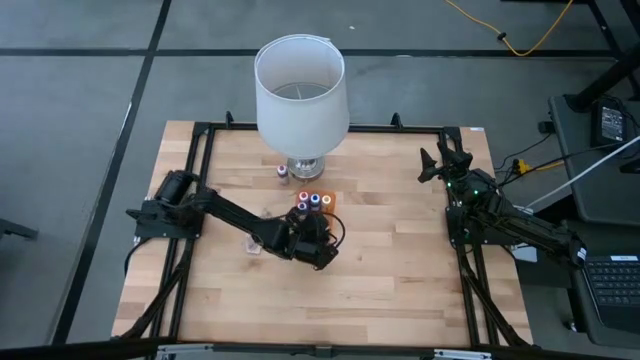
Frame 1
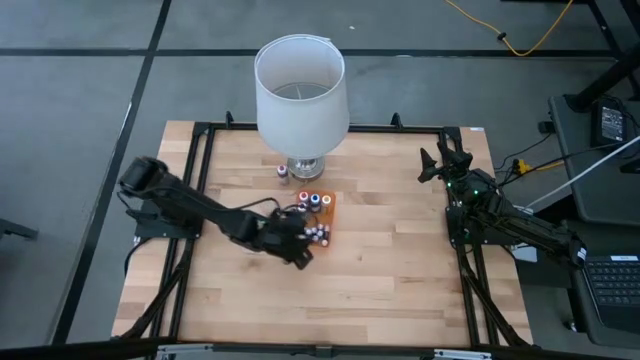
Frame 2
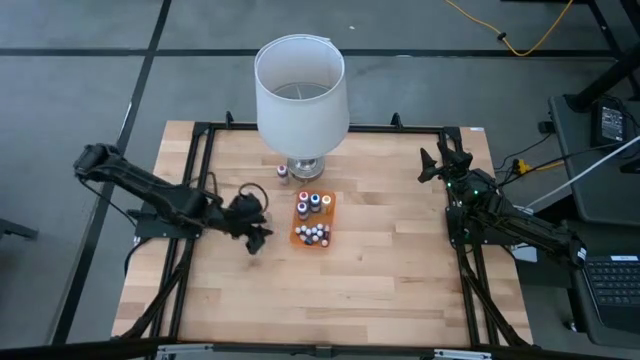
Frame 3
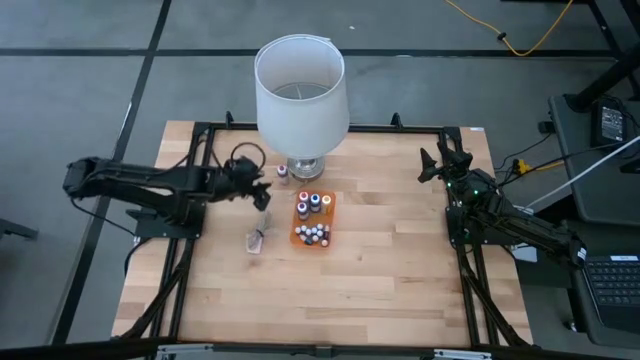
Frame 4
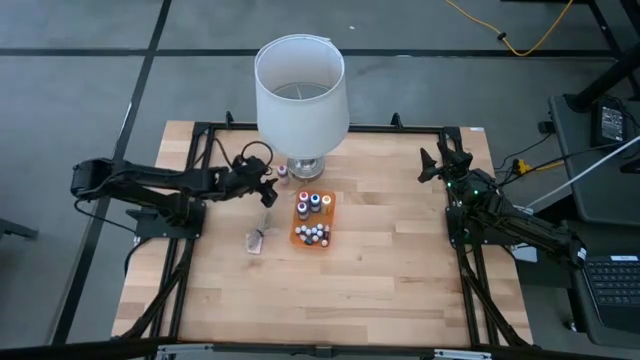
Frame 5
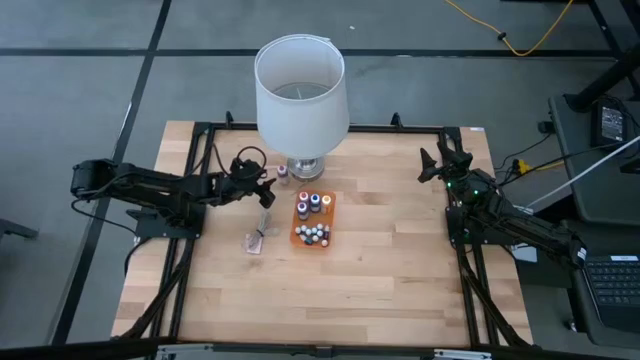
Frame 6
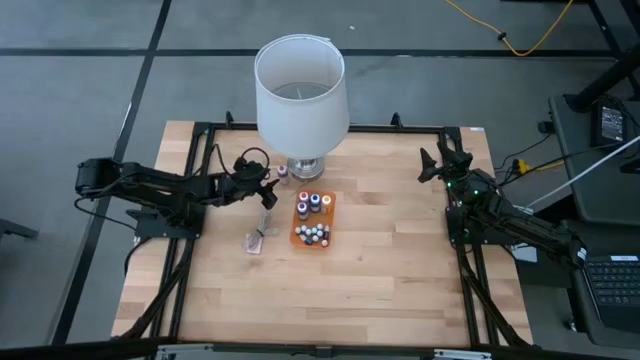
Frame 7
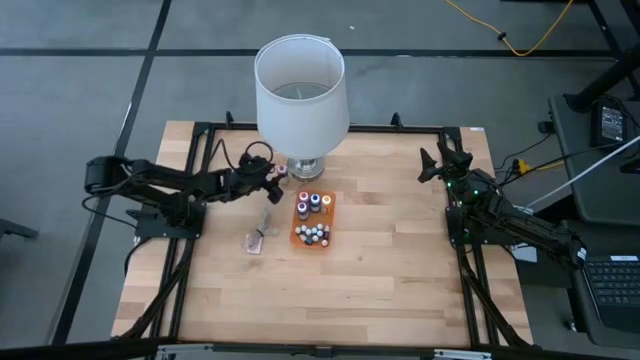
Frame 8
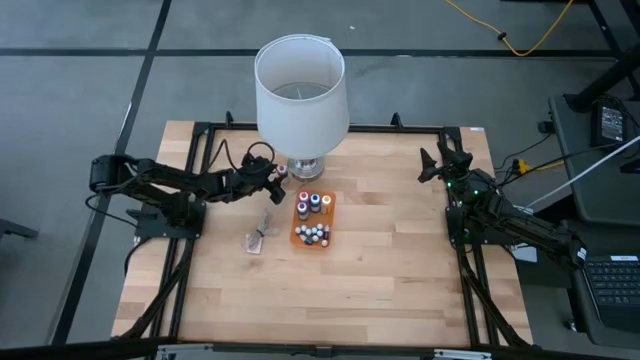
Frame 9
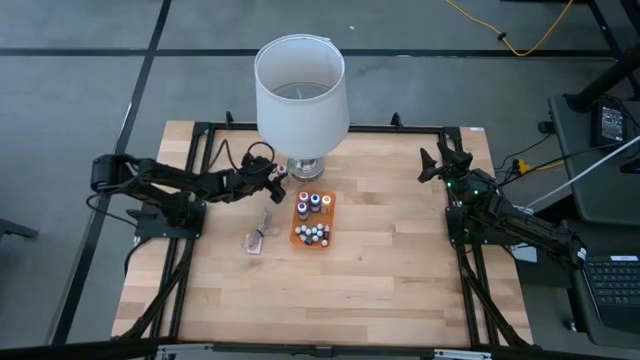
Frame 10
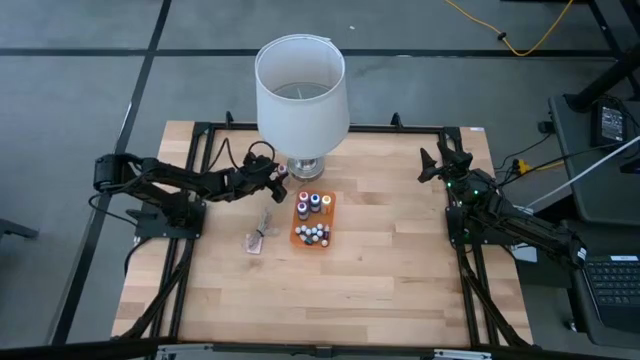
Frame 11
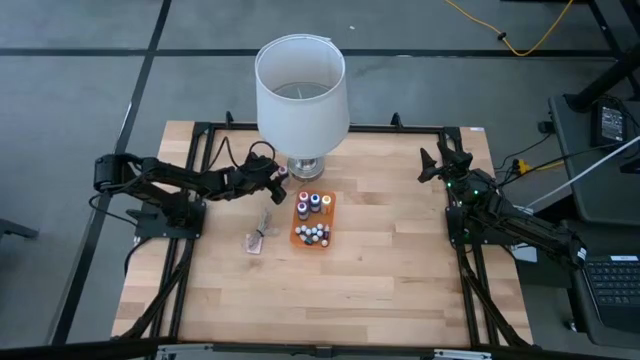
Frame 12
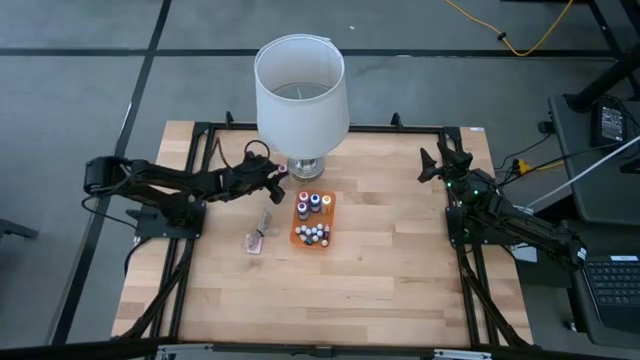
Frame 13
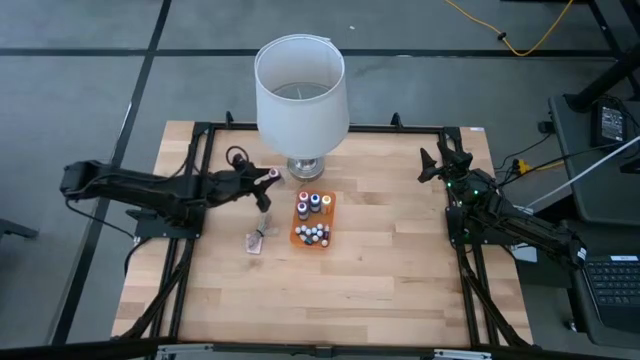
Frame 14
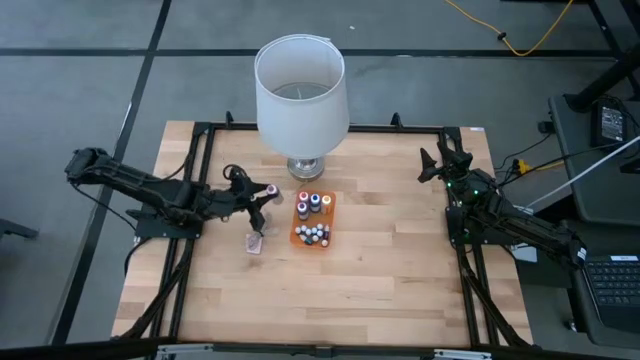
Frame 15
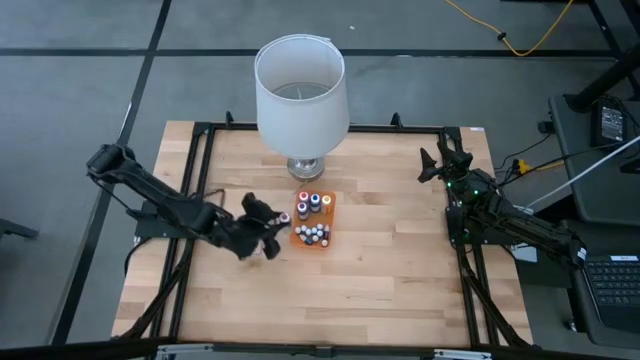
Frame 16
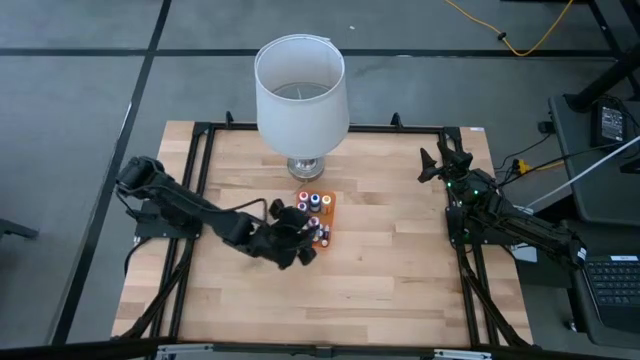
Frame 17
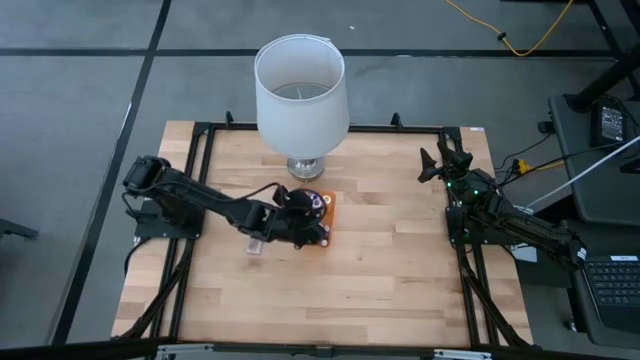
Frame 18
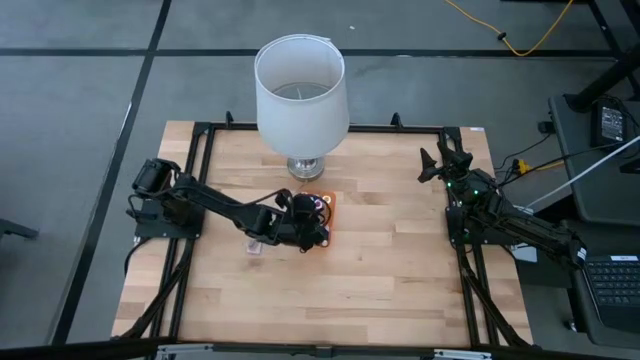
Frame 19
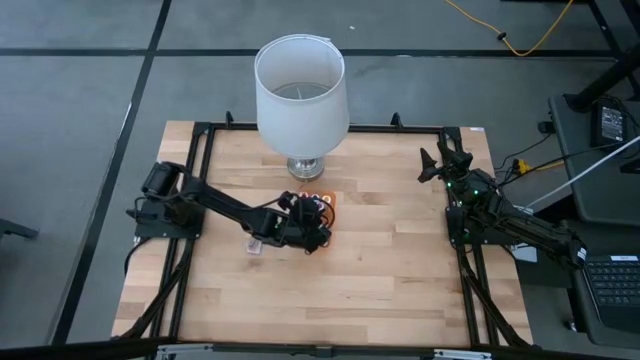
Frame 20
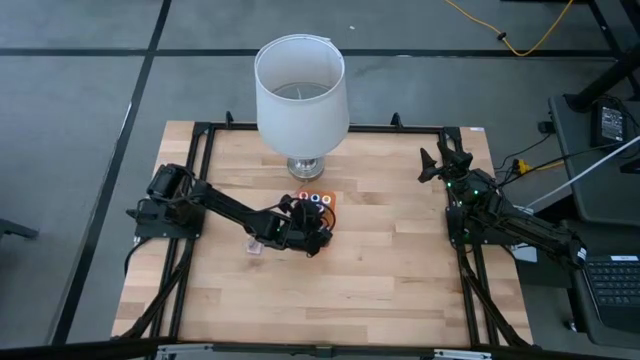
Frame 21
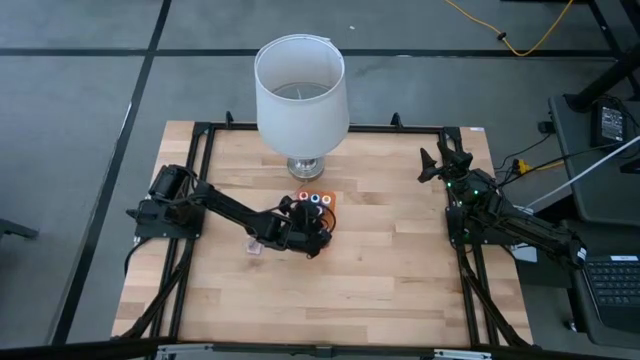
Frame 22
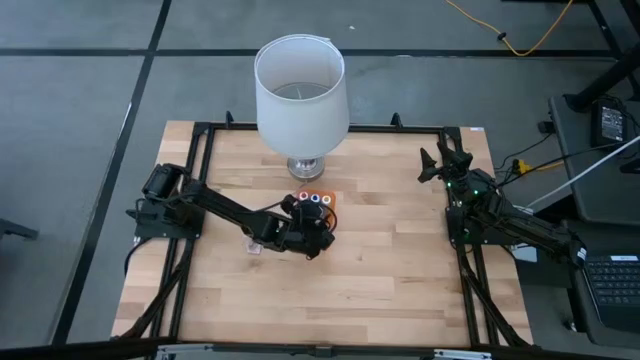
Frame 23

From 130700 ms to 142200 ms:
Task: Pick & Place food coloring
Put the large pink food coloring bottle into the orange bin

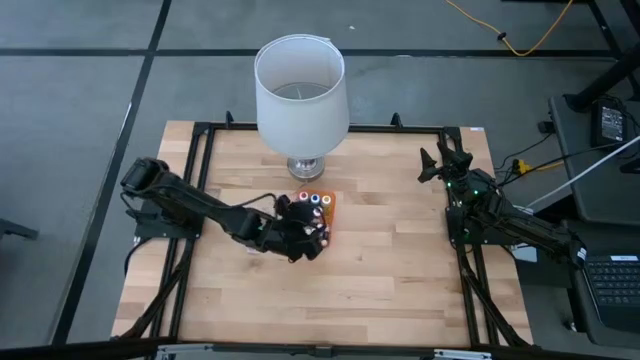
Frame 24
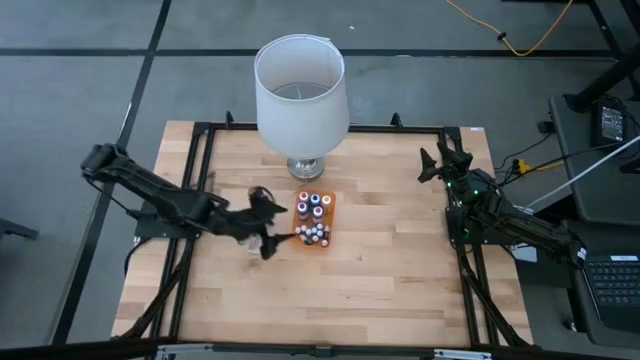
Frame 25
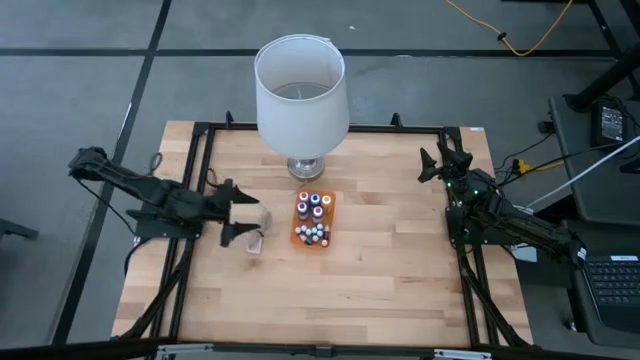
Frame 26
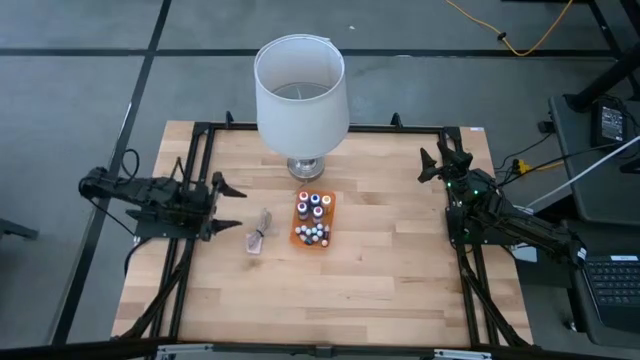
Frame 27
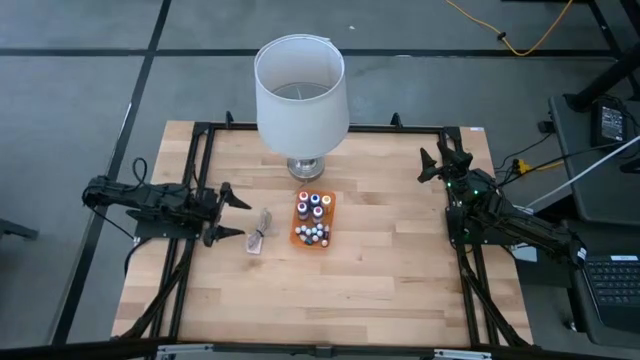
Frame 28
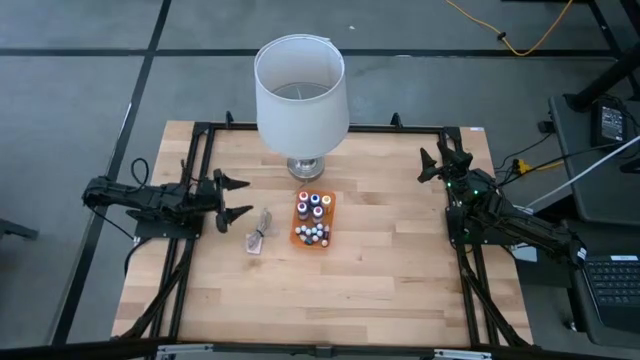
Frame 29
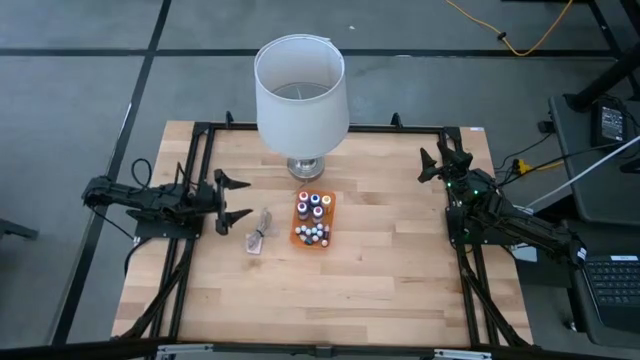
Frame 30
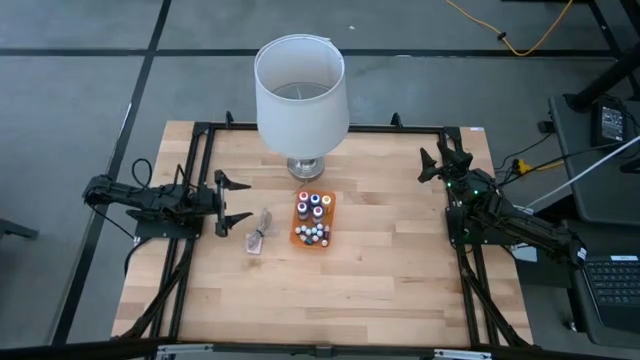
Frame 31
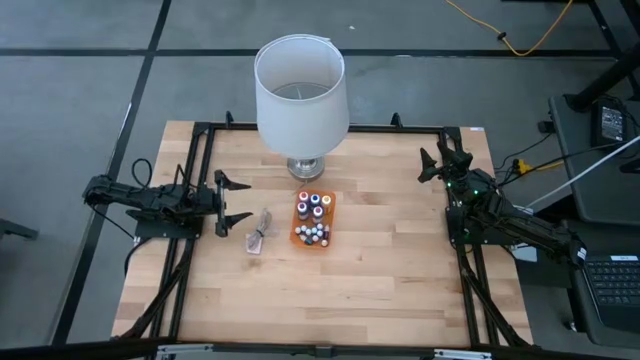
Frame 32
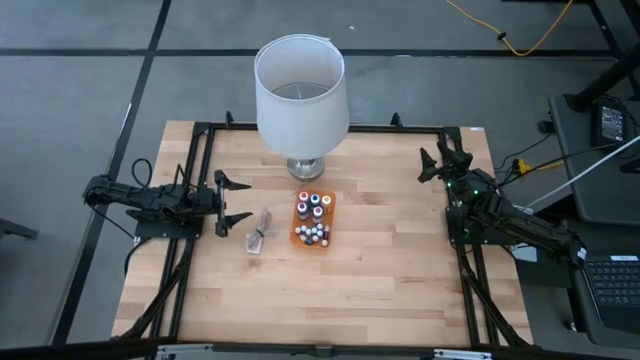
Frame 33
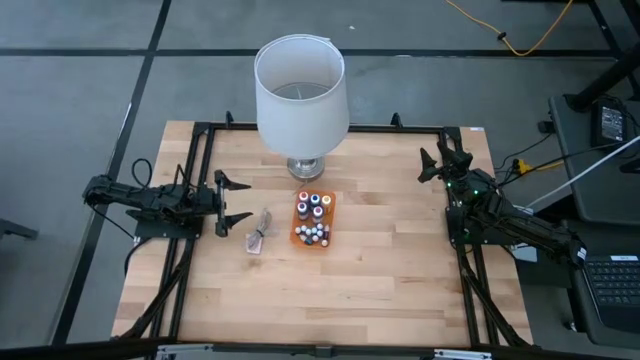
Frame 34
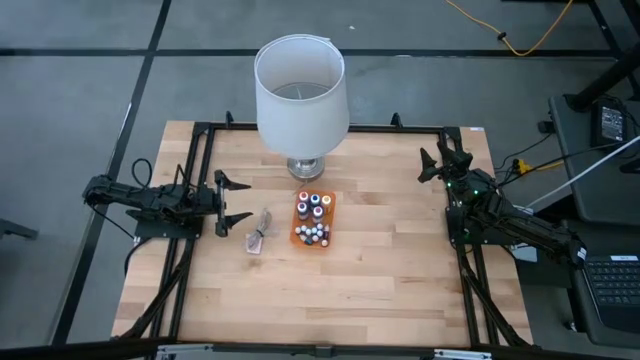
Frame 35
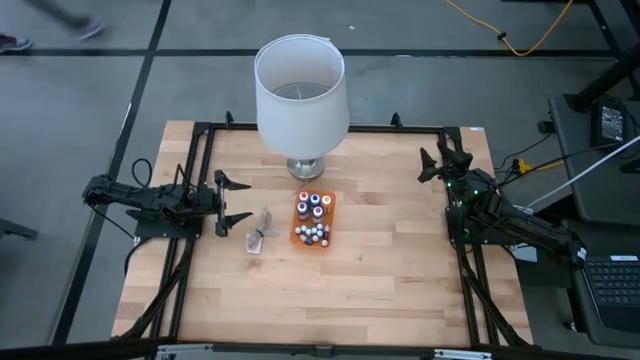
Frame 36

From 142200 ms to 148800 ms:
Return to Home Position

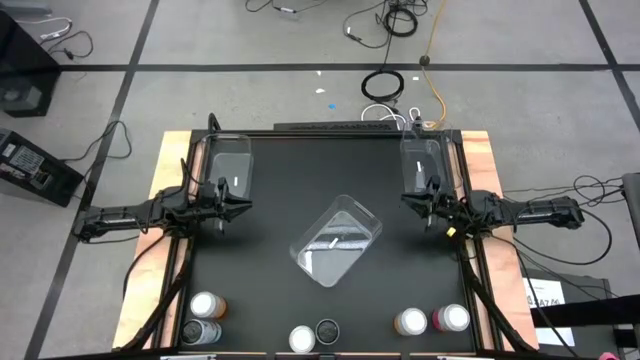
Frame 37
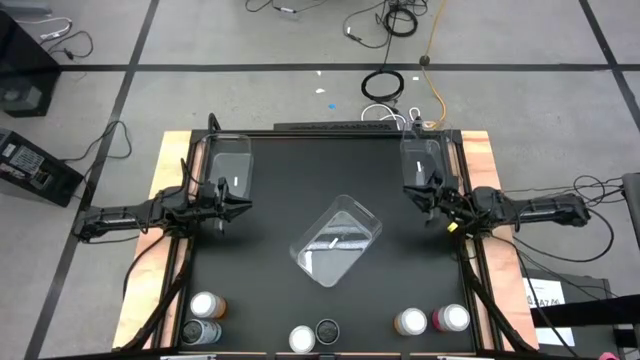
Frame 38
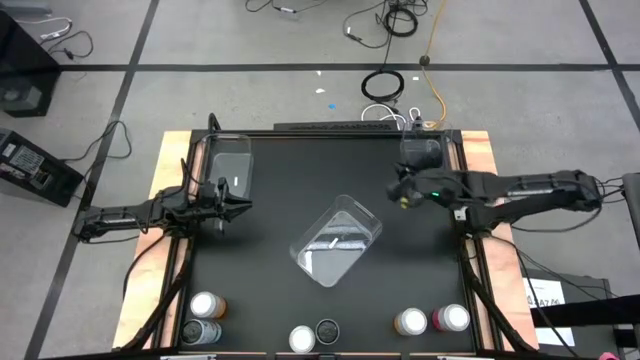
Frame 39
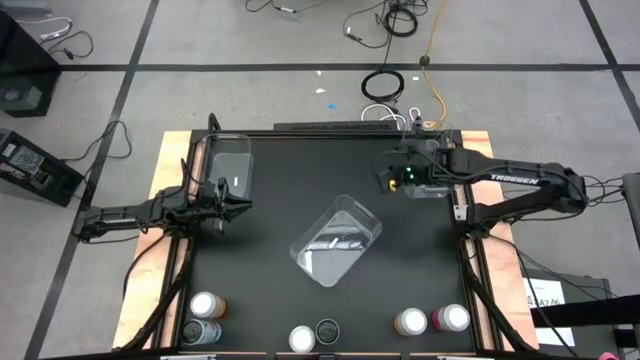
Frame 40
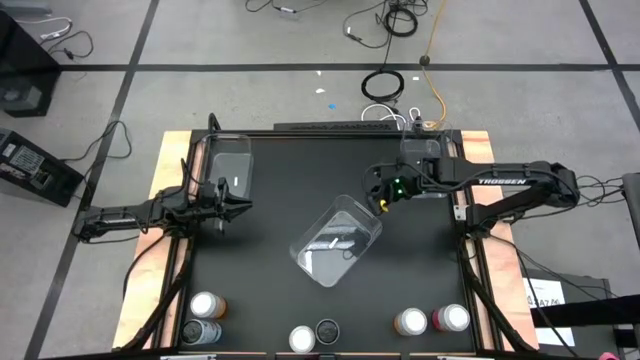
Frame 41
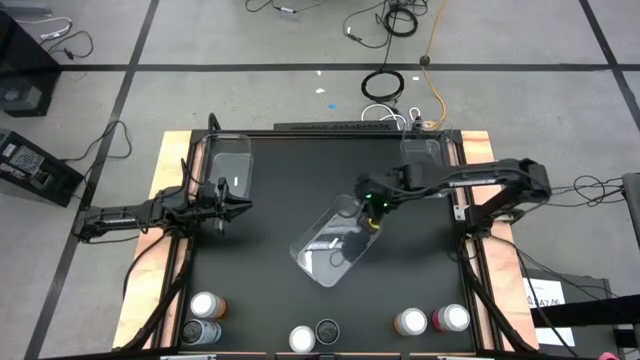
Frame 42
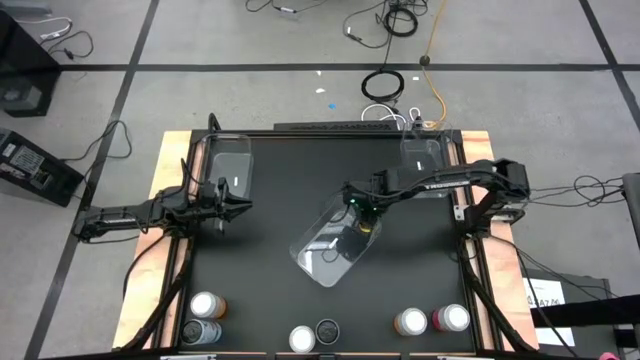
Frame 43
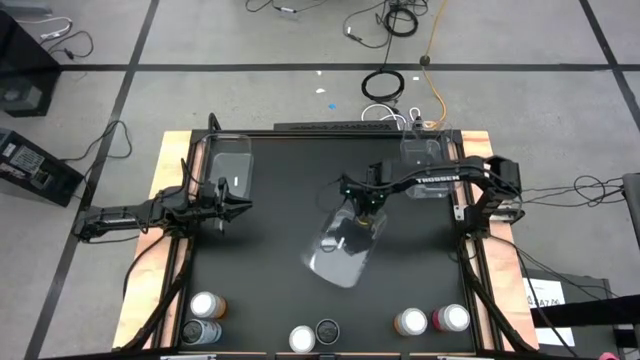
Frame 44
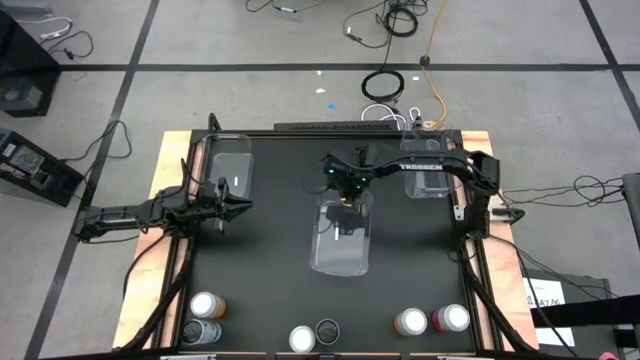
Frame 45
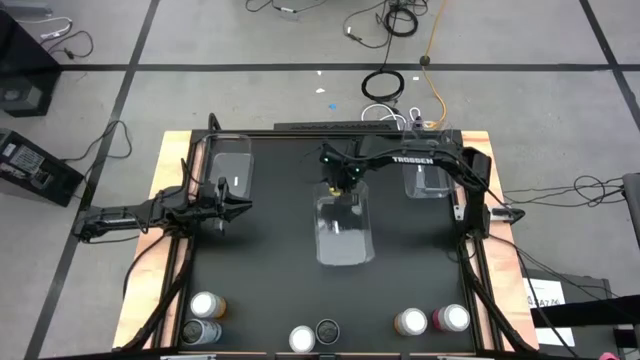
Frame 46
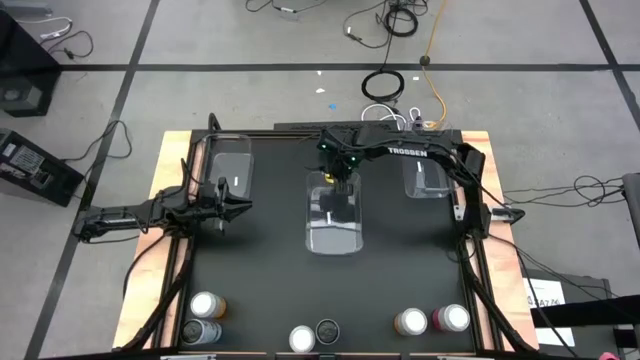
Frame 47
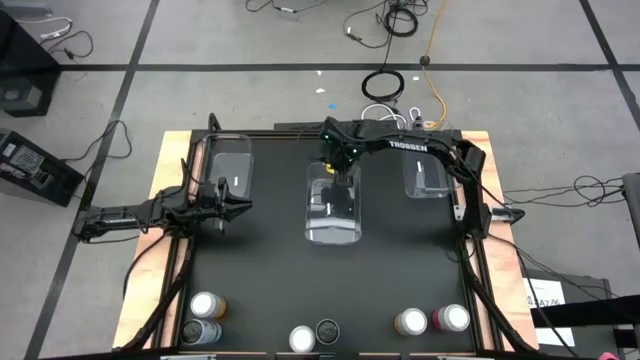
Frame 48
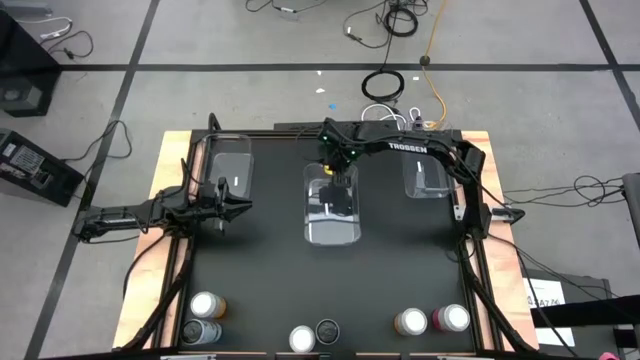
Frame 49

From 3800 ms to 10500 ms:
Task: Sort soda cans
Adjust the middle transparent bin
